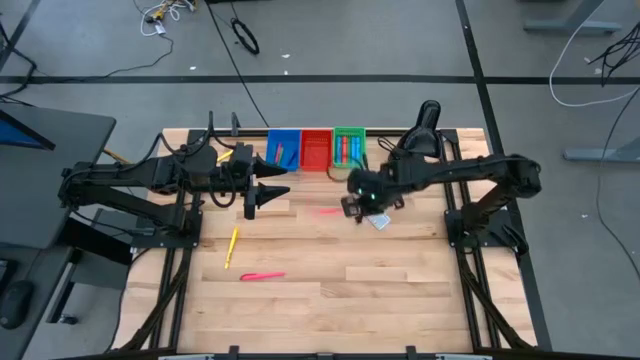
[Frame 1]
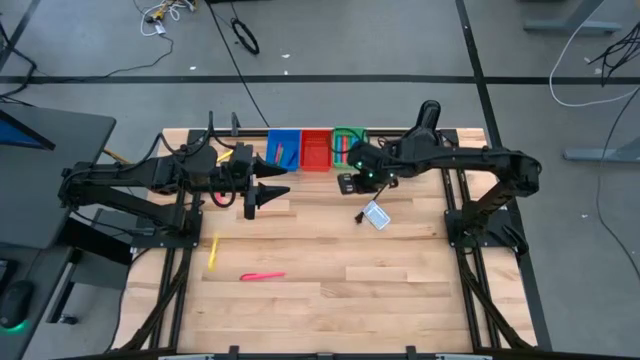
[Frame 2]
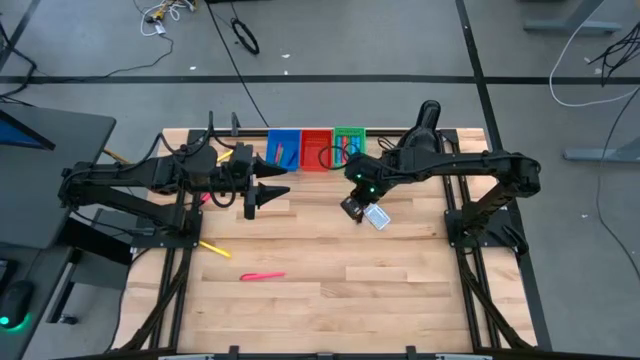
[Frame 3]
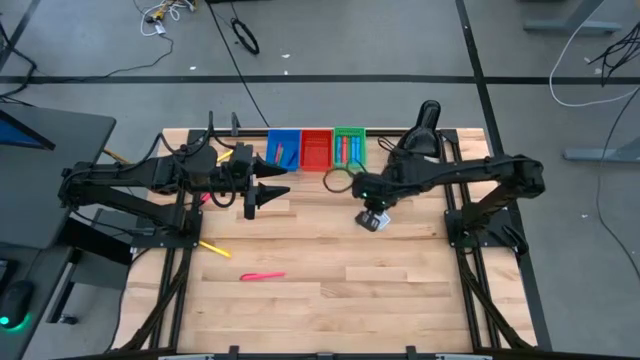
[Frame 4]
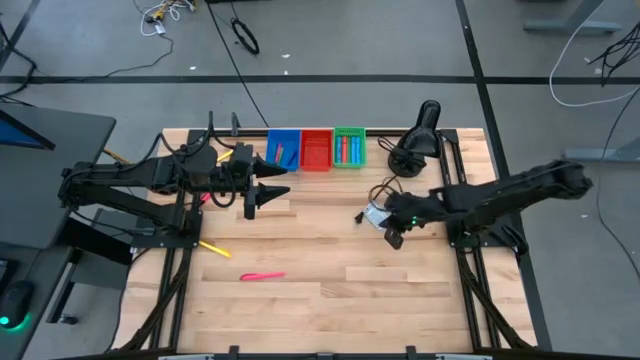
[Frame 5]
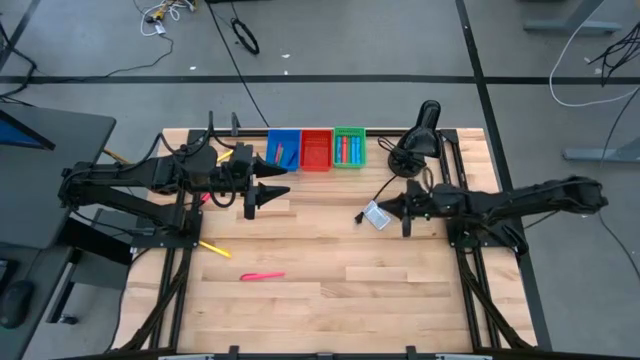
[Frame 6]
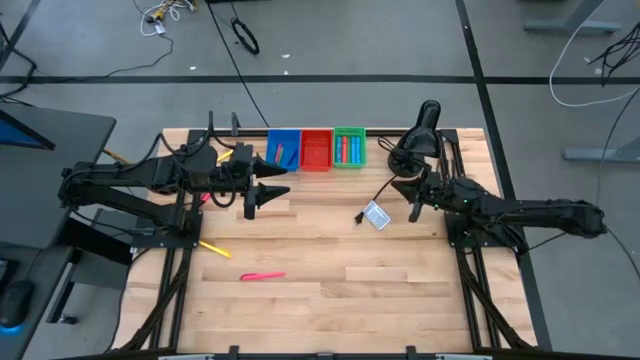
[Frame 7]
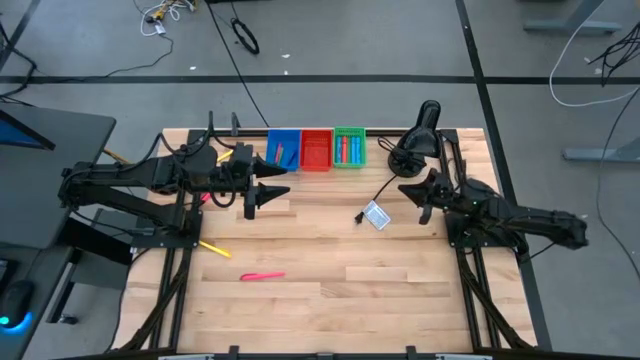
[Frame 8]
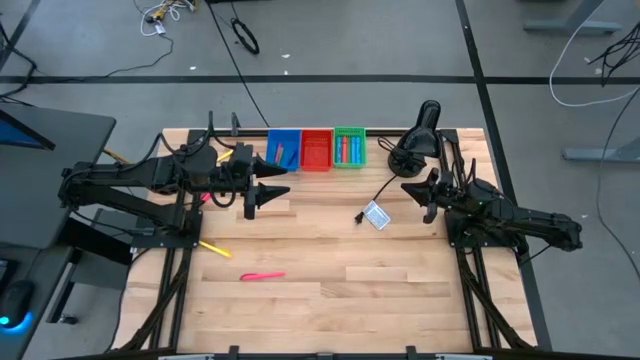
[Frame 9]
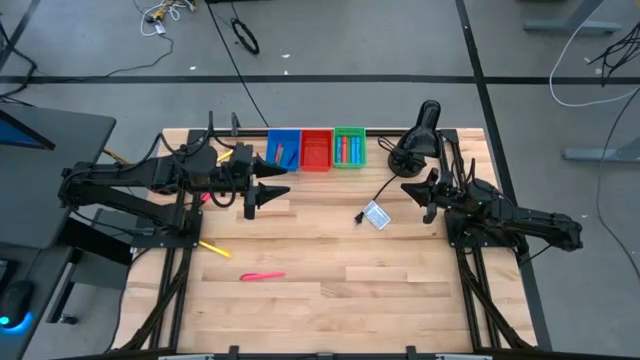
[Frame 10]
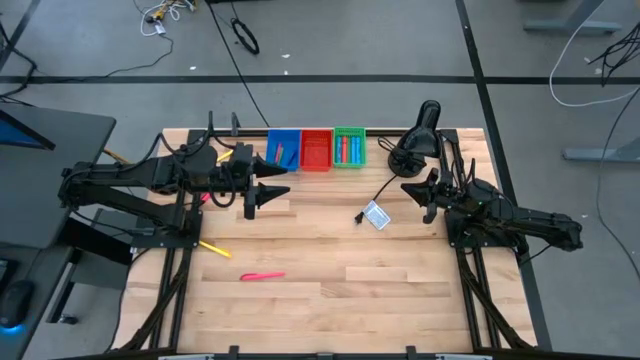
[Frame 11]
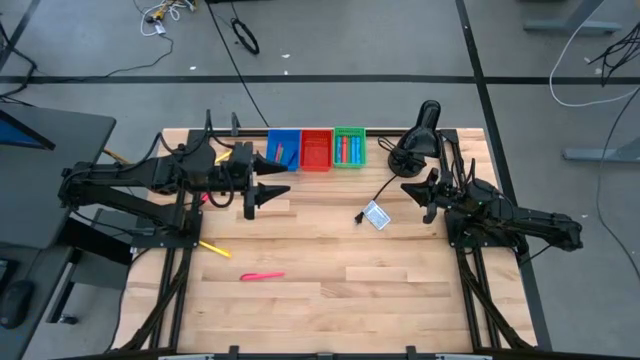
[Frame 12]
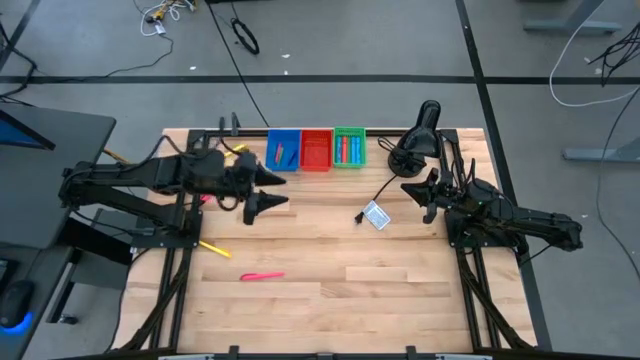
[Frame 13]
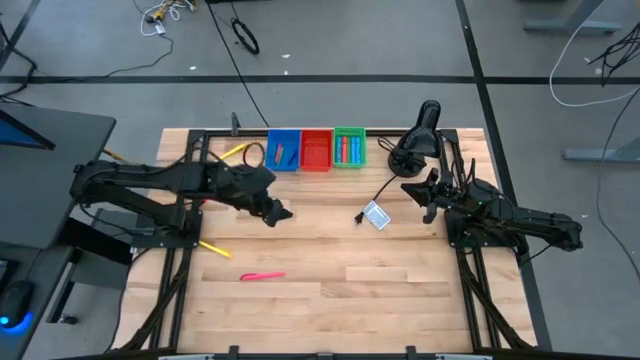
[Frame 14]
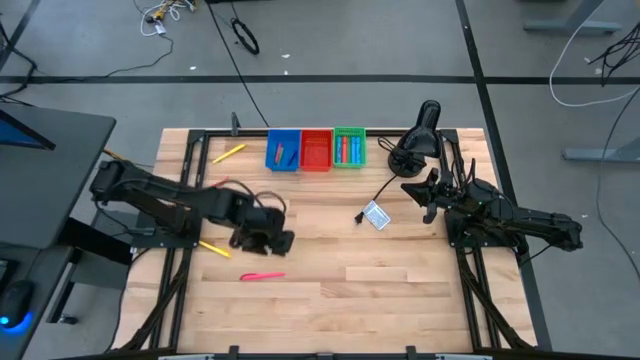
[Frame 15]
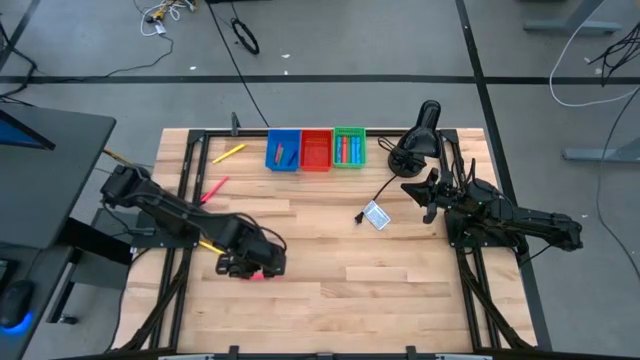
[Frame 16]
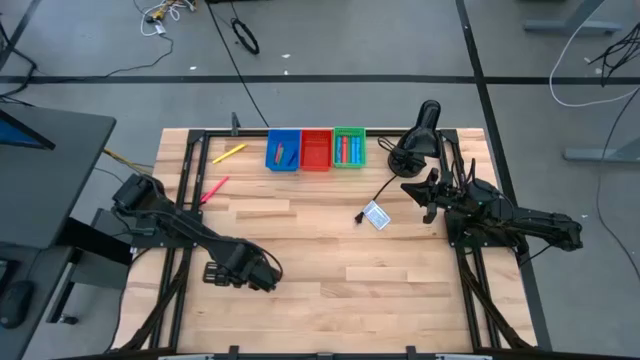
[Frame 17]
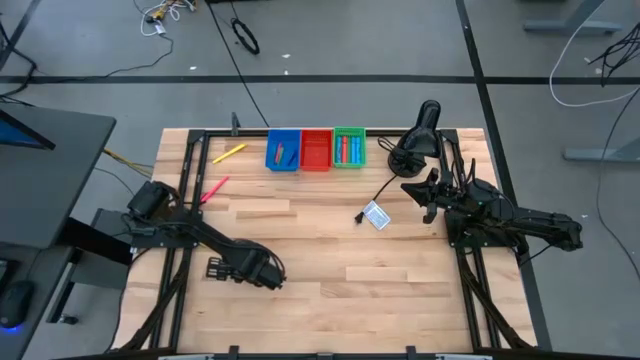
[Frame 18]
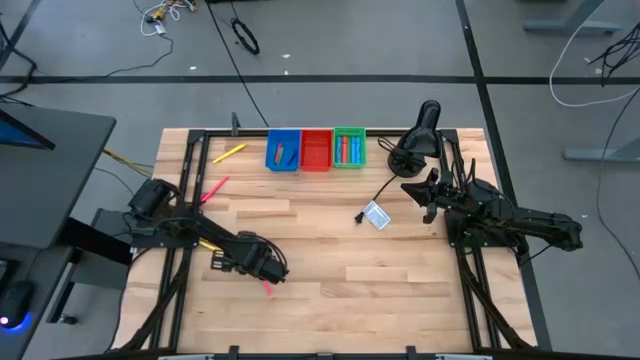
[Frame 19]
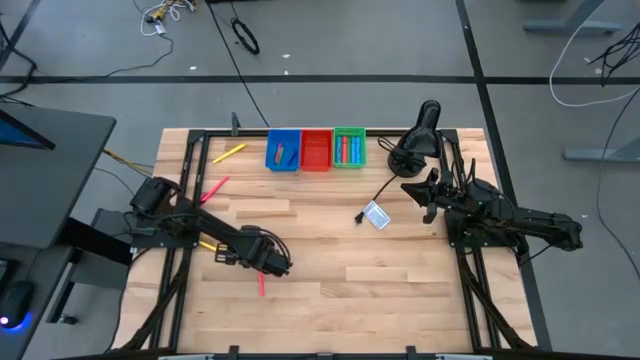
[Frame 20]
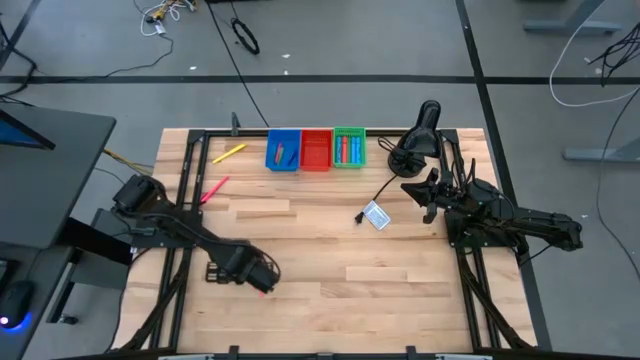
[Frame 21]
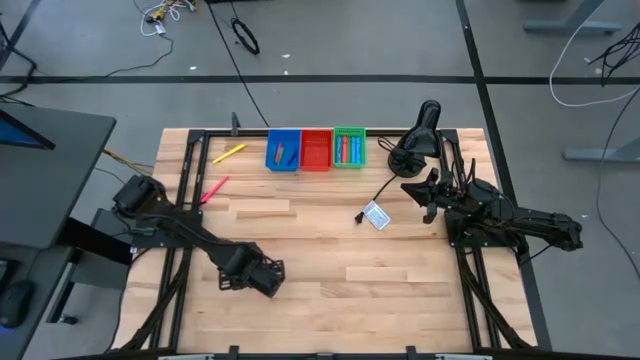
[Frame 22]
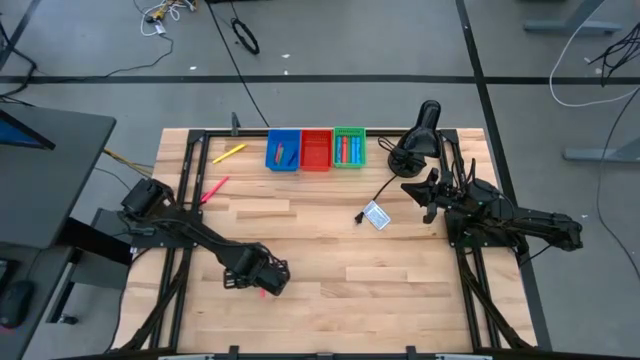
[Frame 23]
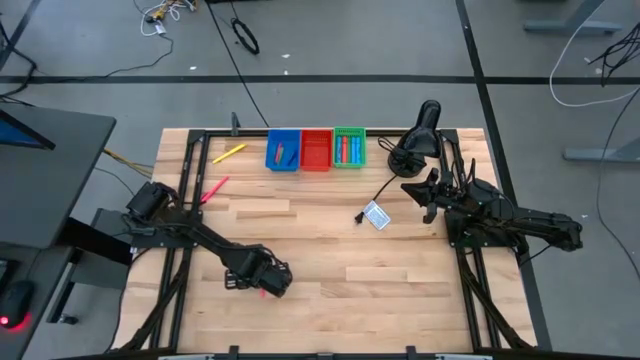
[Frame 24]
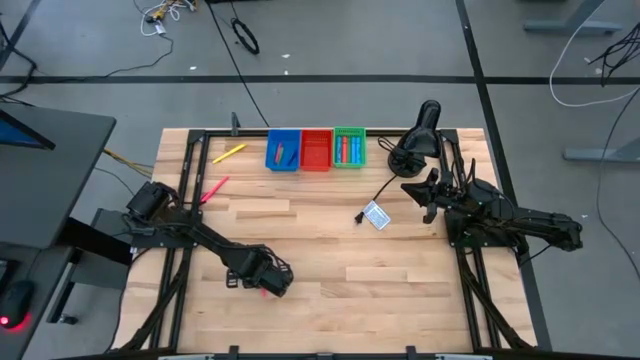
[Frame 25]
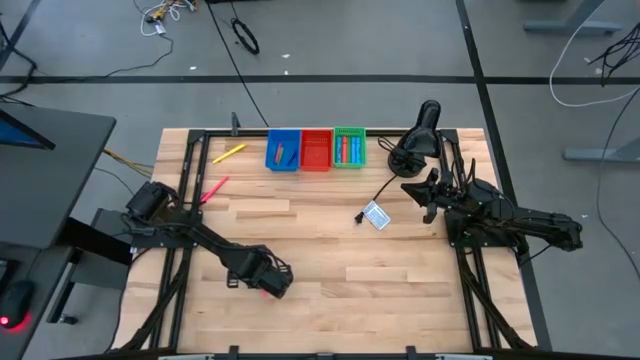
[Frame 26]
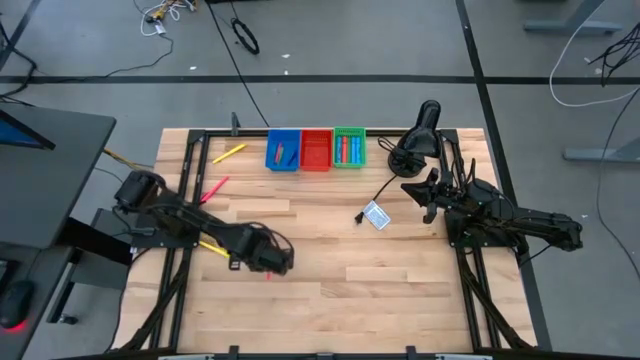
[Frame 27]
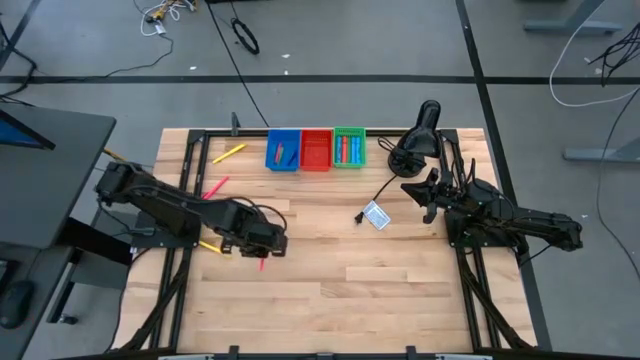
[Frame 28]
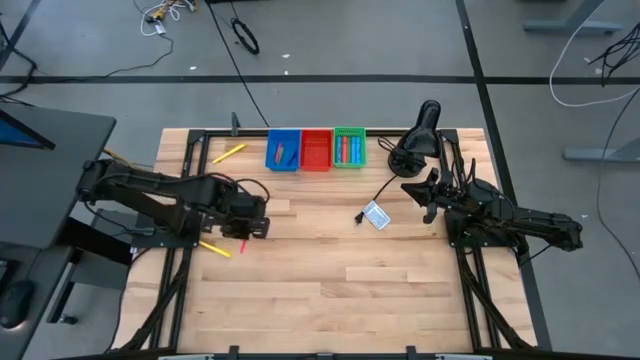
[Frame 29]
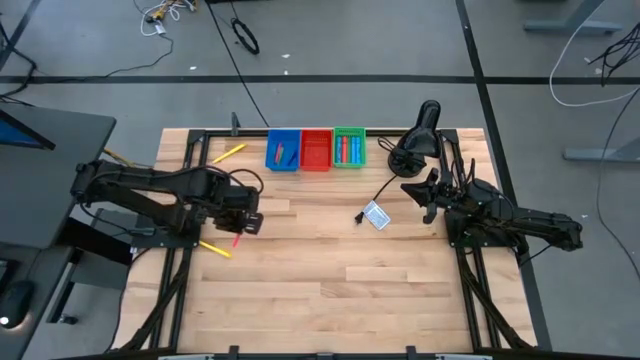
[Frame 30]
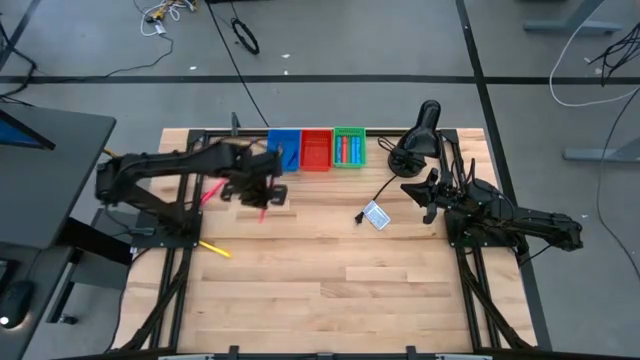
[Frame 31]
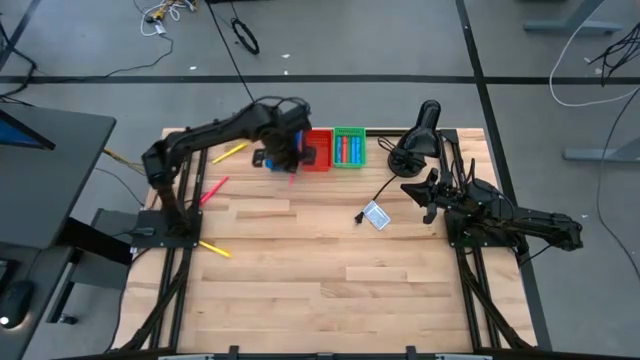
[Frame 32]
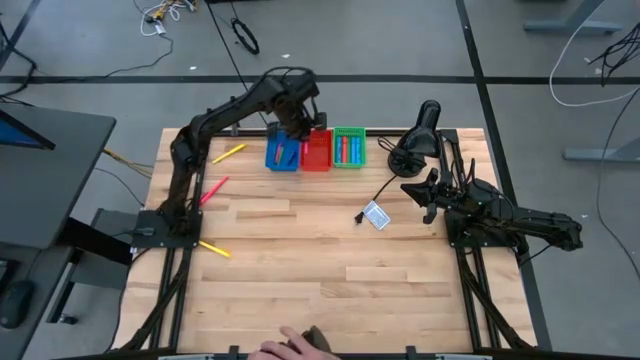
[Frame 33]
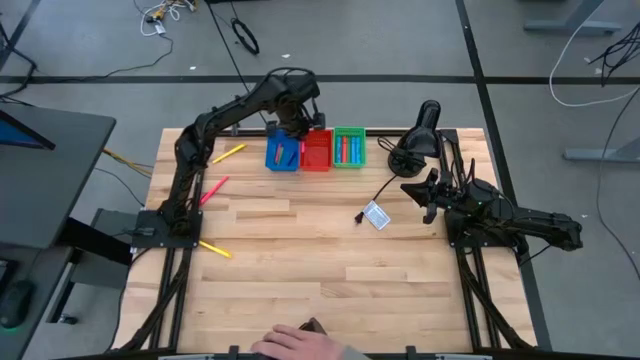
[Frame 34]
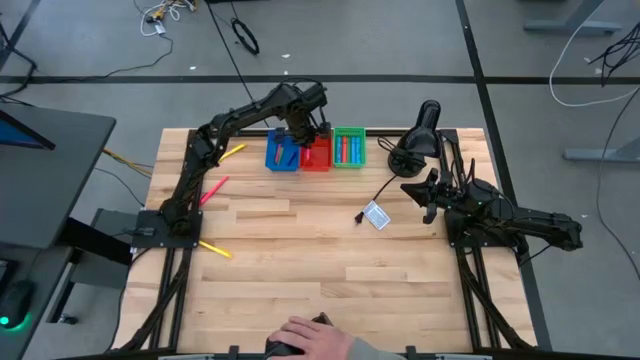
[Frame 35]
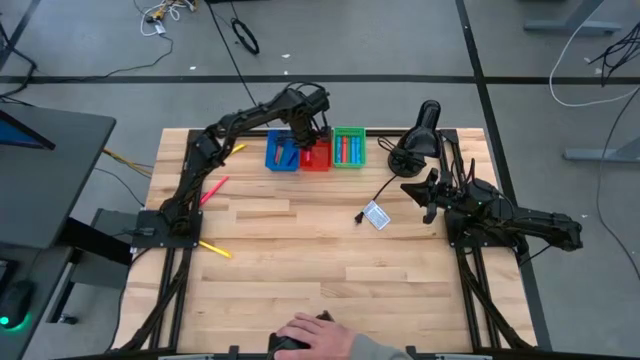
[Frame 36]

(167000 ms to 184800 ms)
Task: Pick & Place Markers
Put the bottom pink marker into the red bin

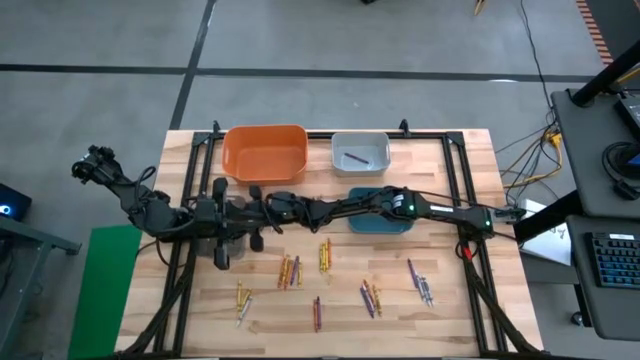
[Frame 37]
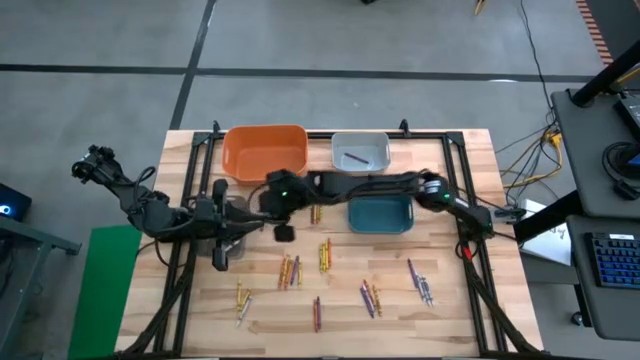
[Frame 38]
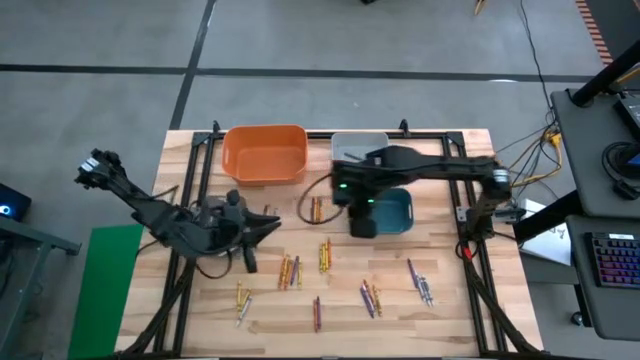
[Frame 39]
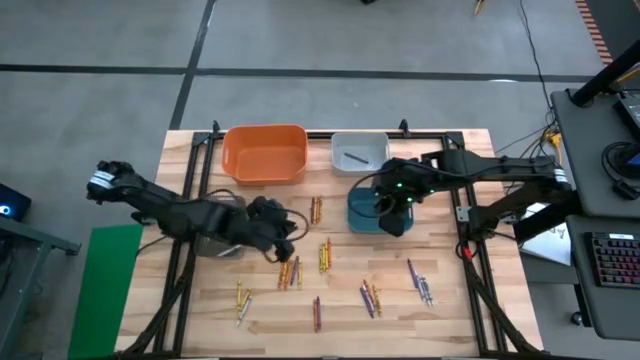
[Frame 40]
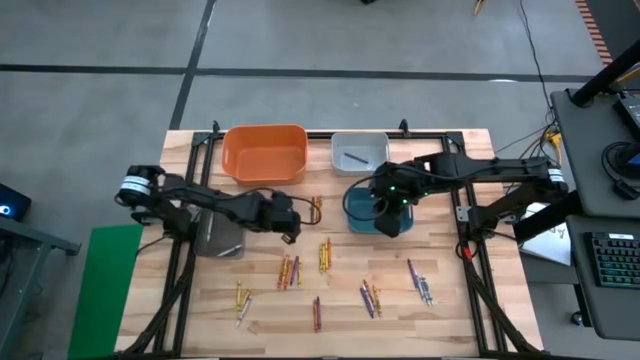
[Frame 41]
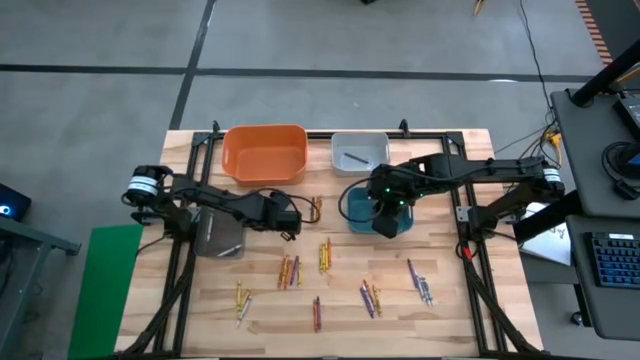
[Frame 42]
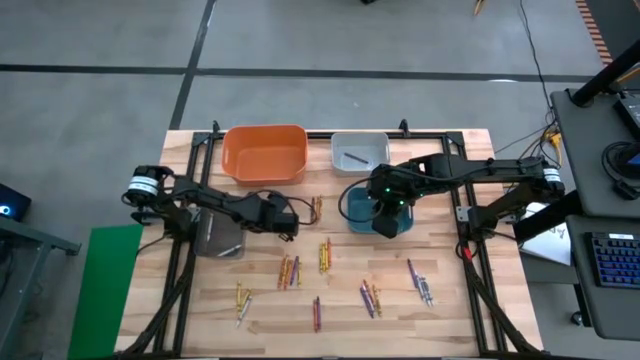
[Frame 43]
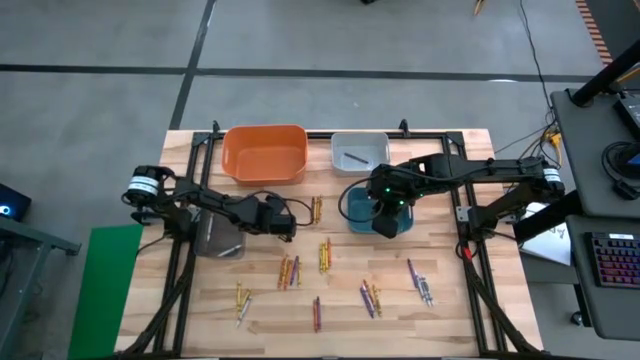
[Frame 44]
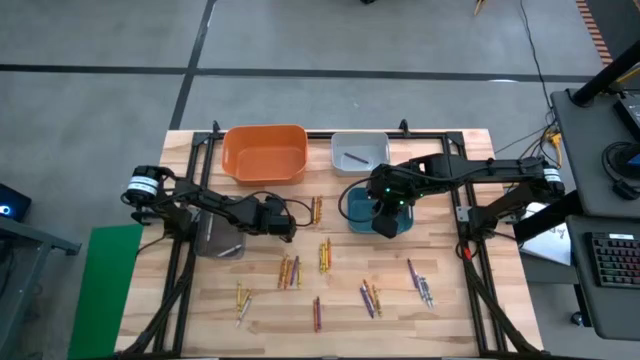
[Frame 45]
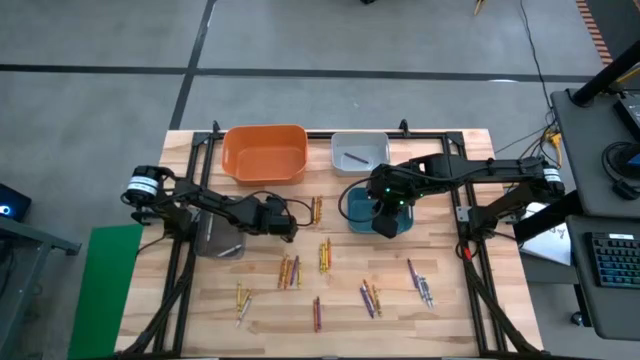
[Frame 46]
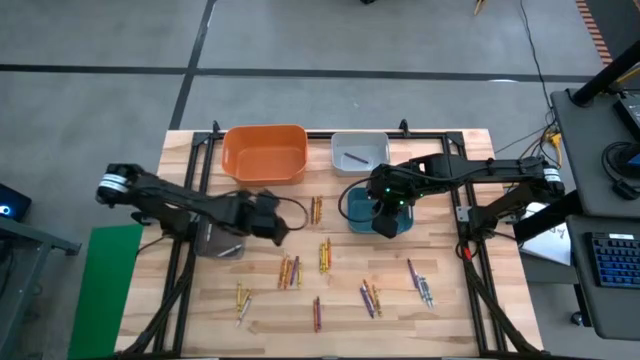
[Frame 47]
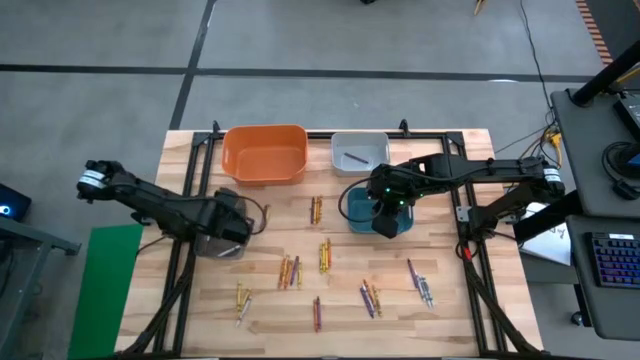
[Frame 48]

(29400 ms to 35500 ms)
Task: Sort crayons
Put the white crayon into the black bin
